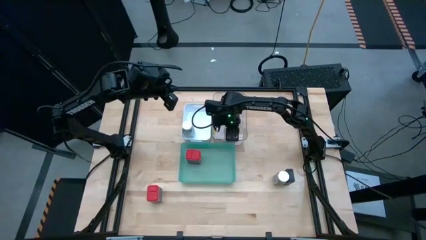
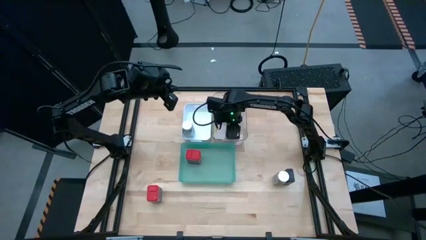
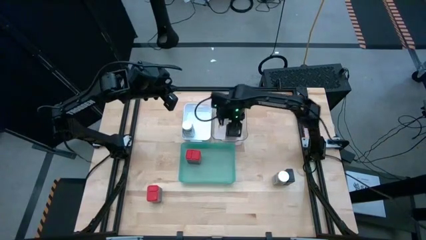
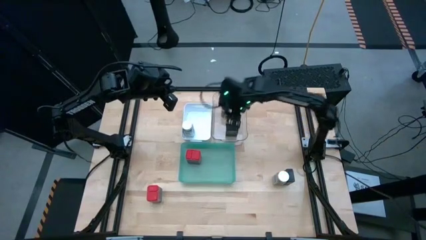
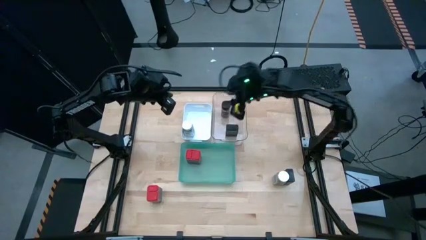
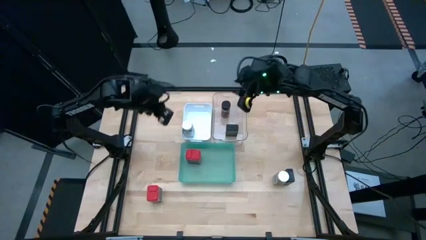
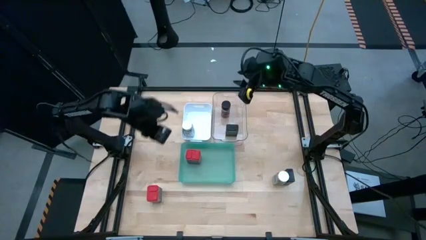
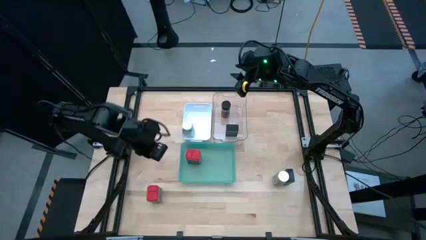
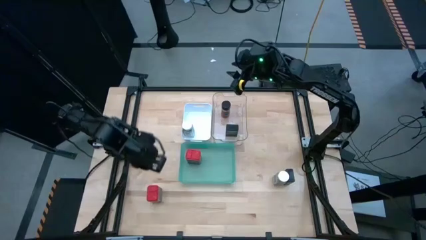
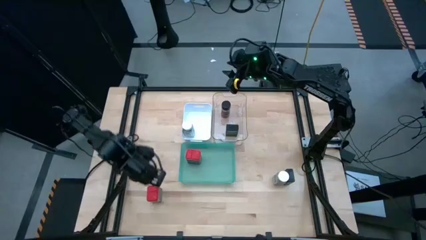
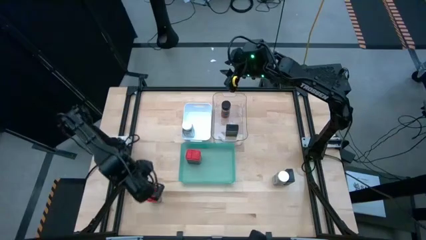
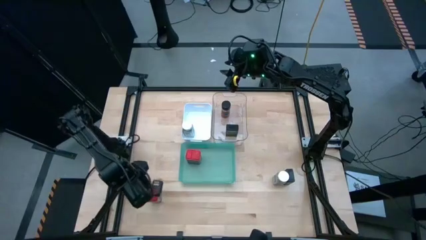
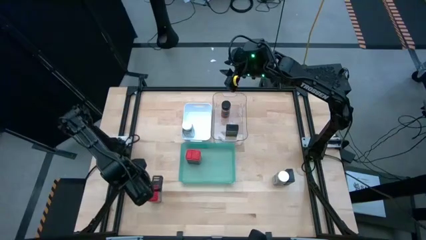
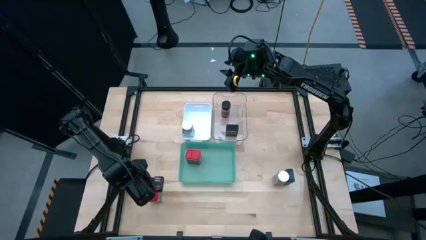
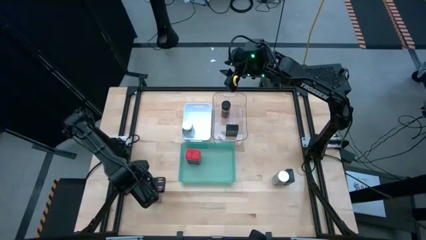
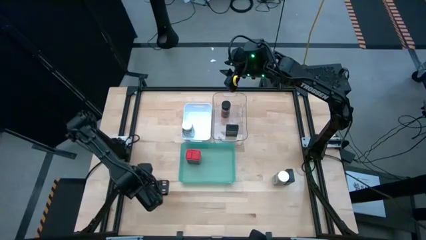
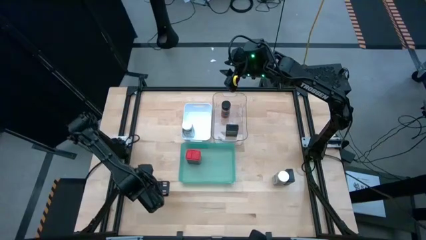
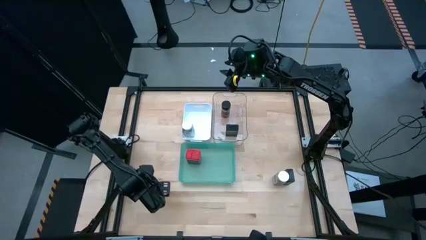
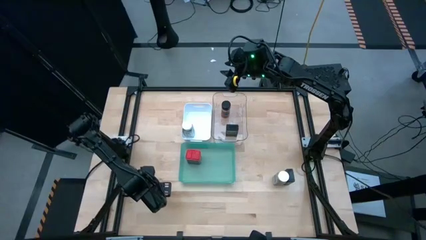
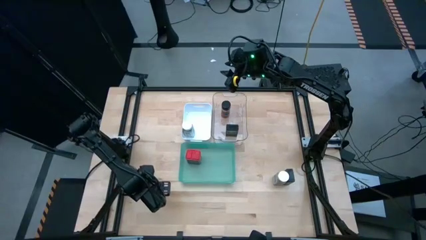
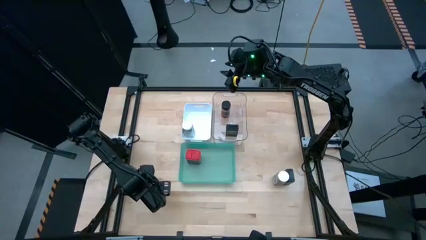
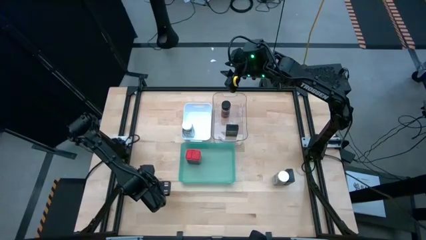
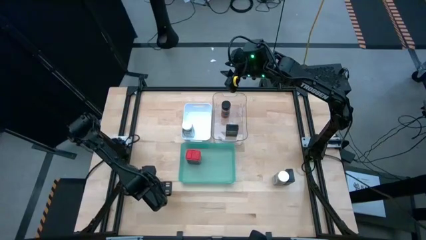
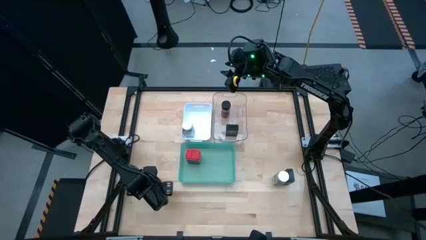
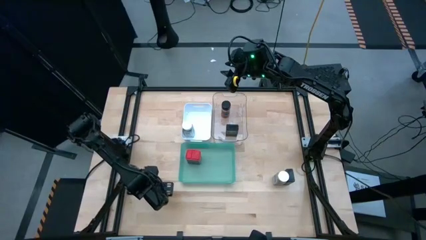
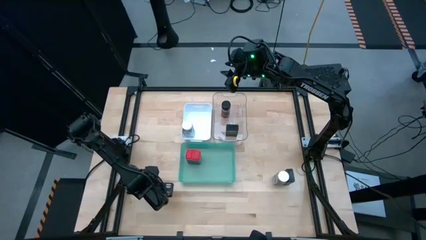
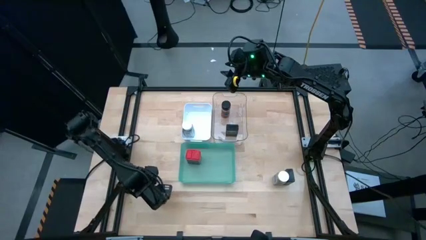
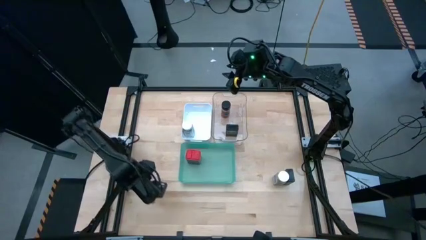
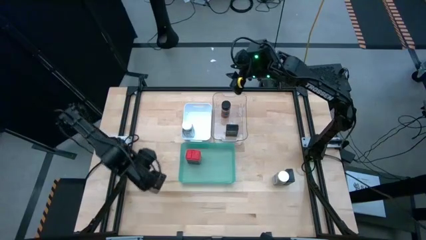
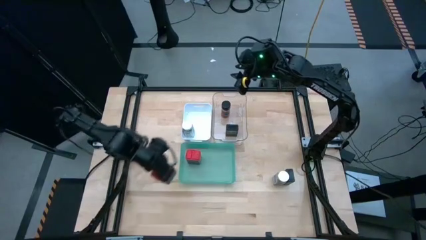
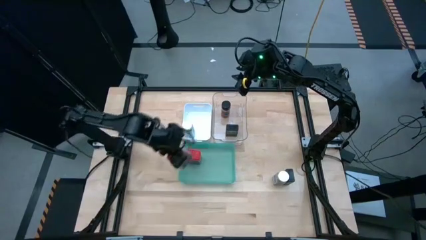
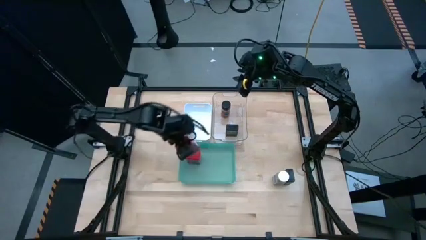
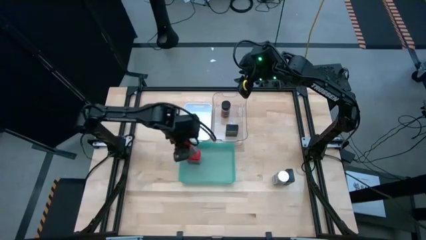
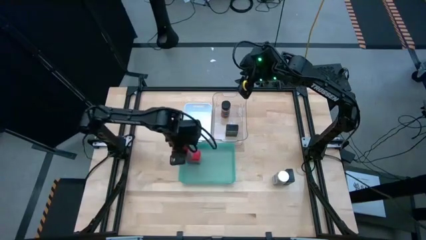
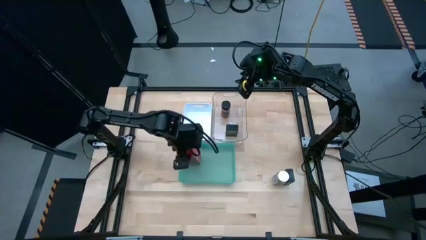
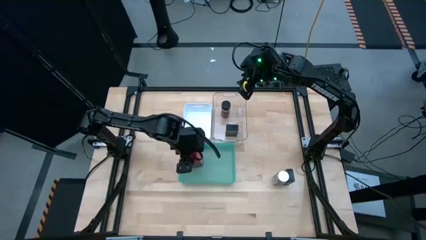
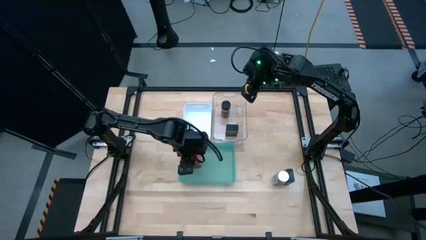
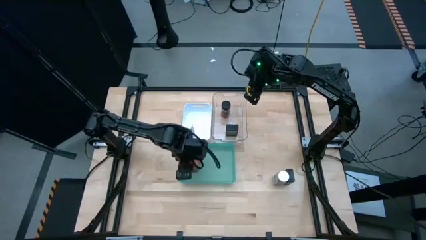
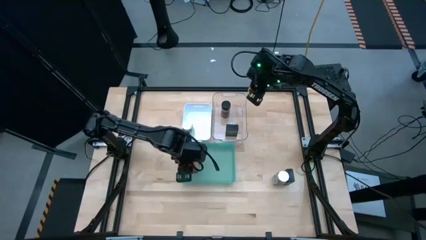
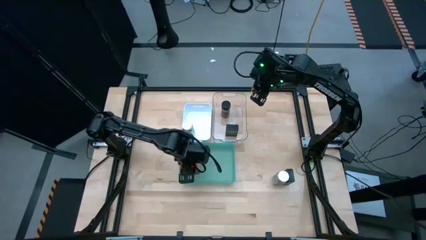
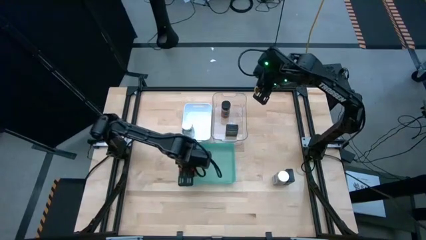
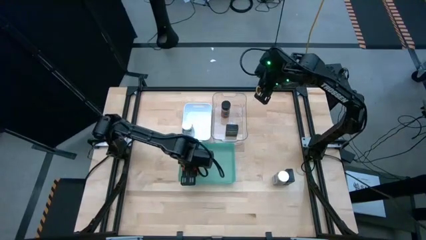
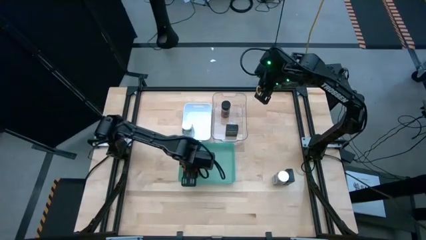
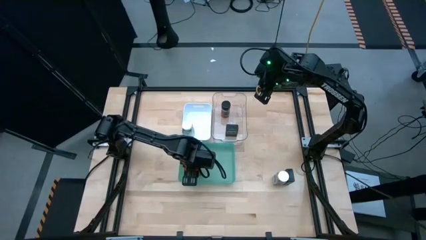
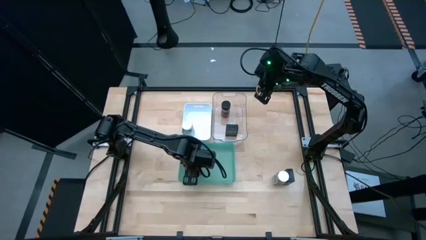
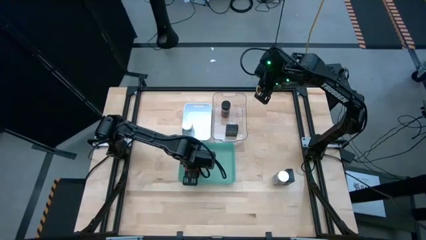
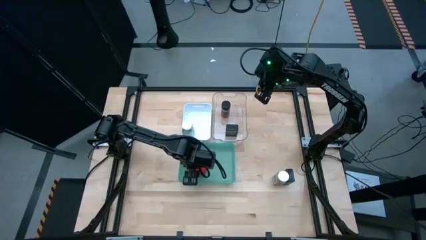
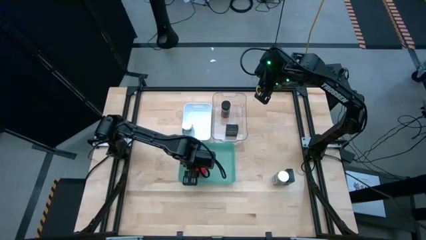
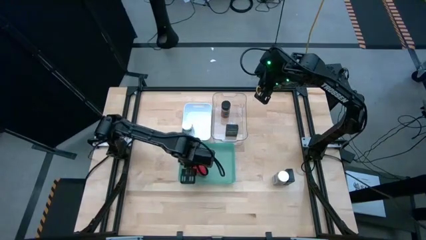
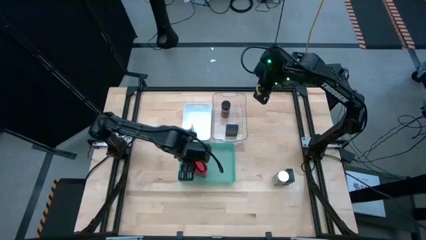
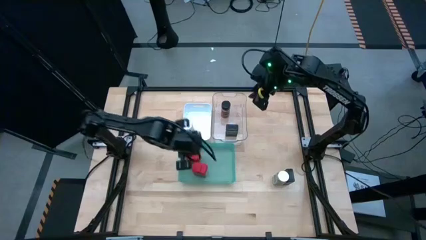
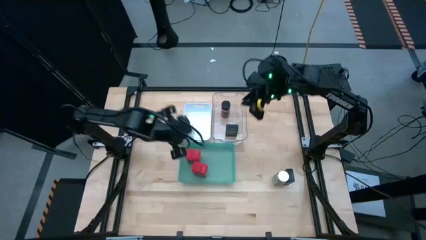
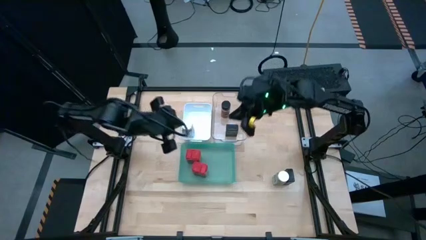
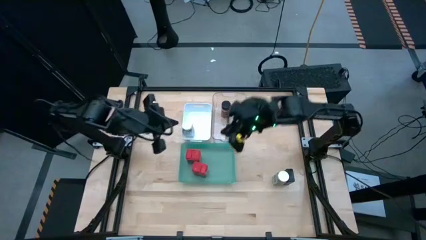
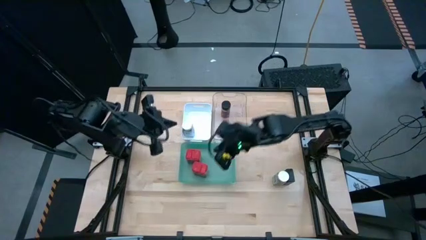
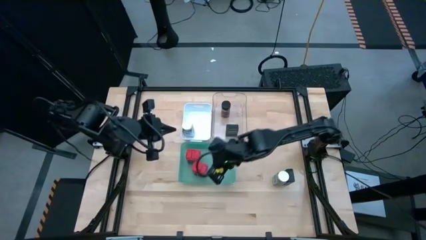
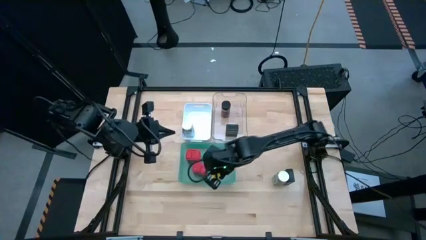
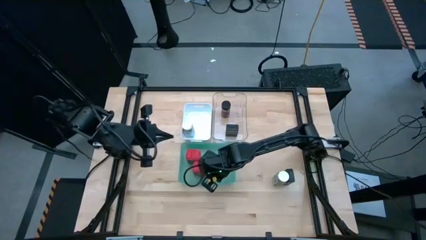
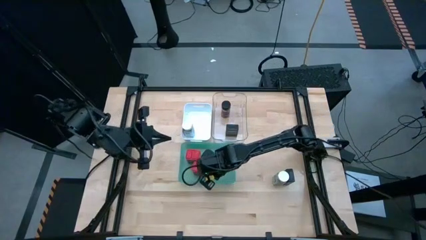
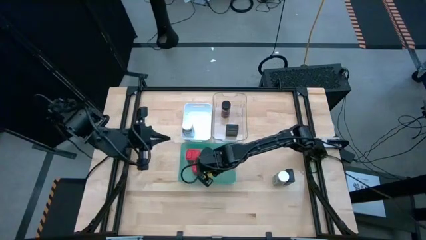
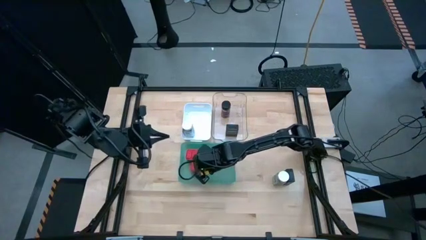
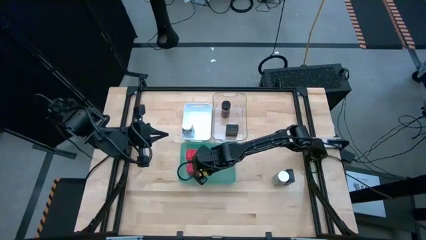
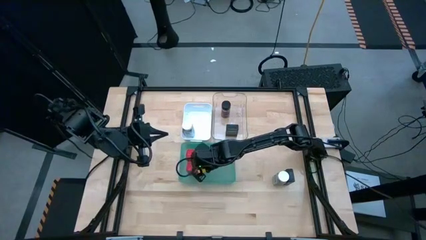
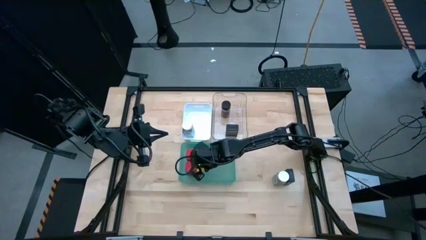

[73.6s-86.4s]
Task: Sort spices by type
Put the red spice can into the green bin

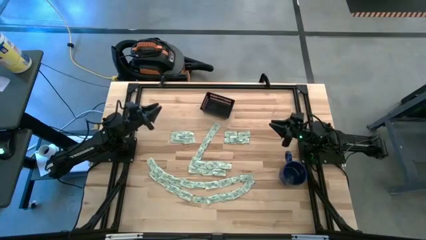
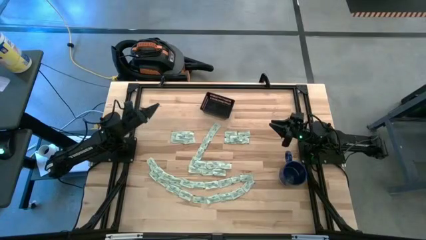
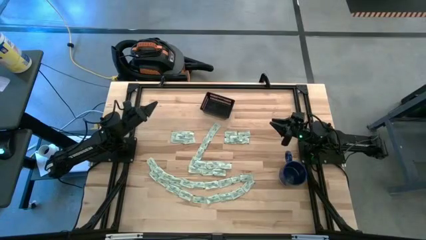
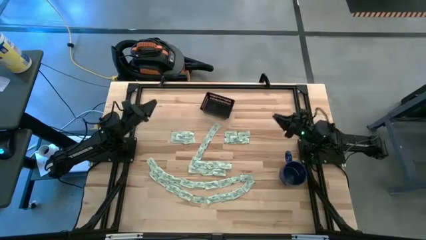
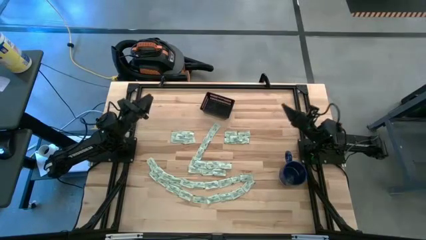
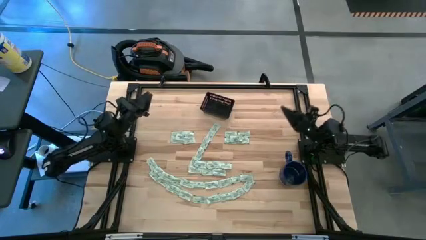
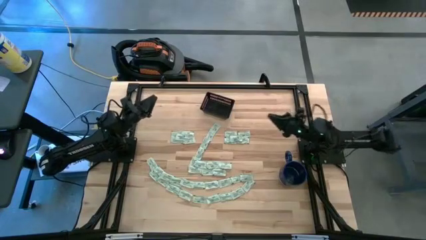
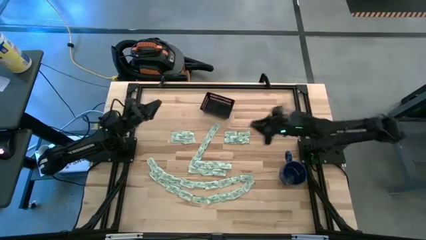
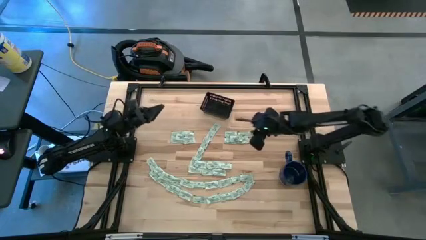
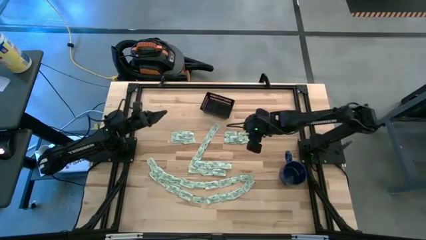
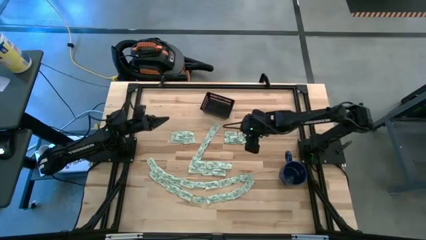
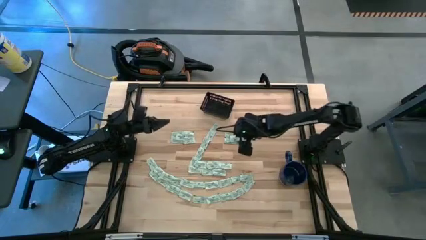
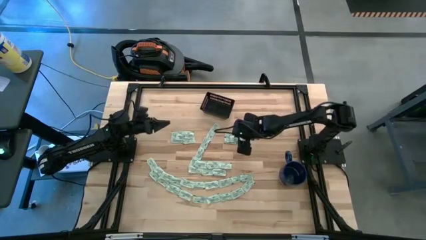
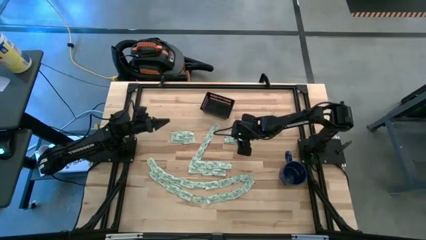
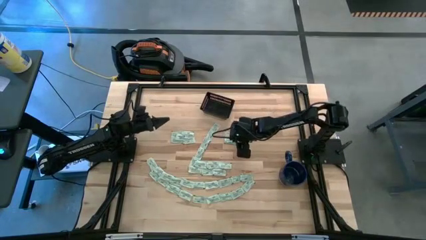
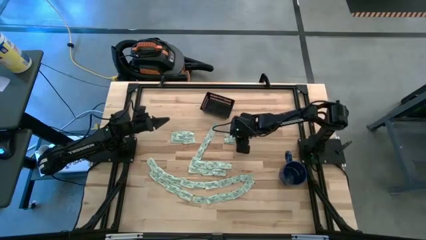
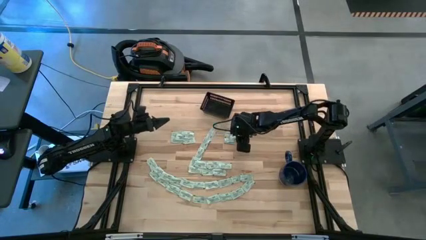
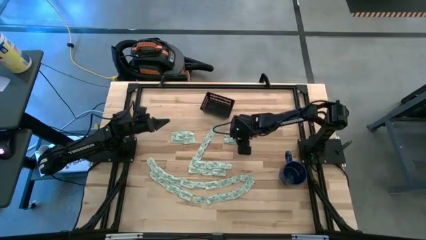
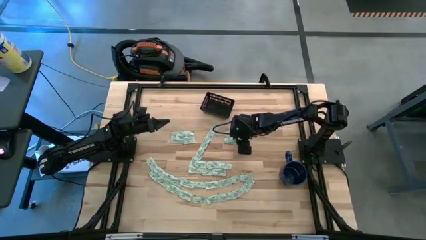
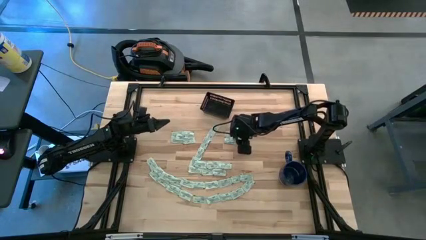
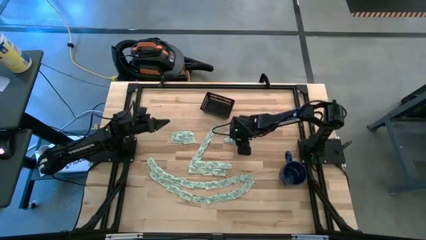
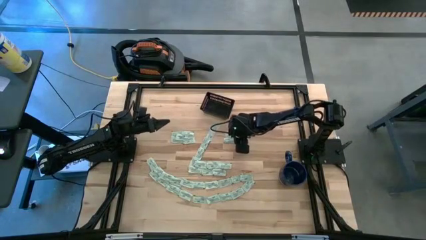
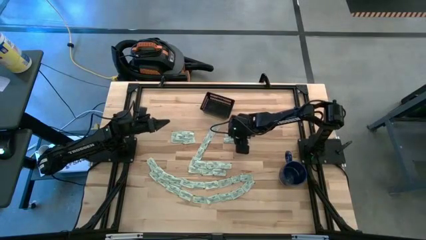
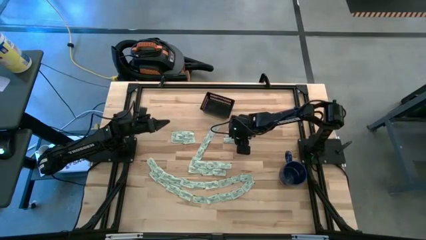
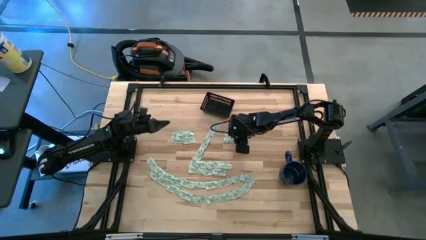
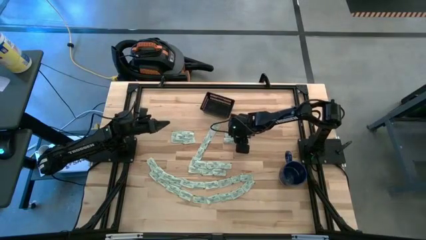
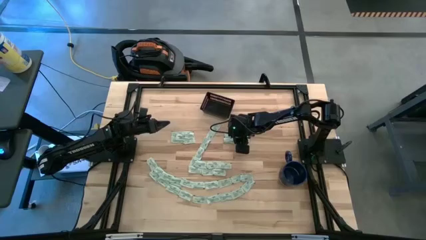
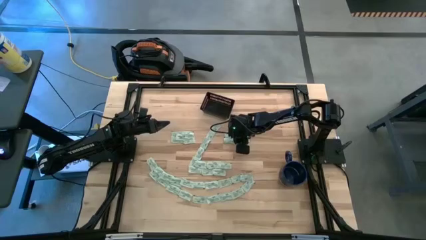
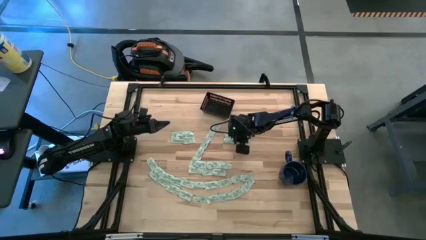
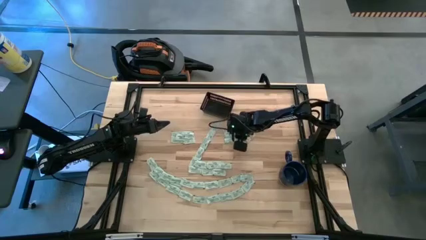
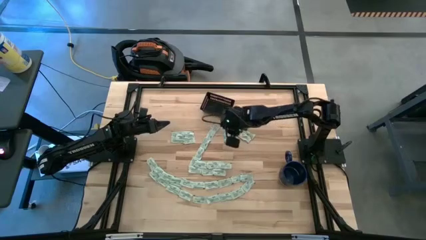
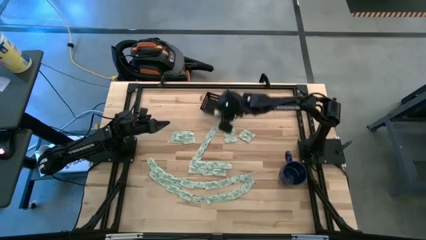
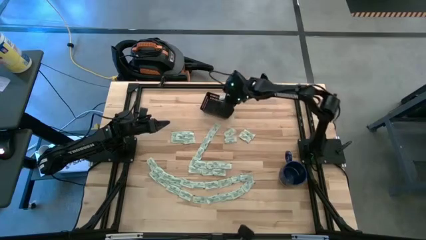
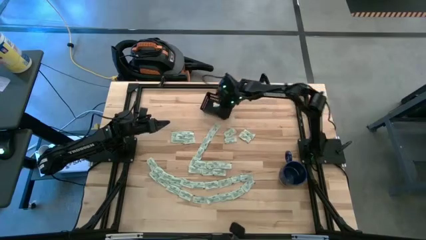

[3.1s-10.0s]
Task: Pick and place Stevia / Truvia into bins
Put the stevia packet into the black bin
